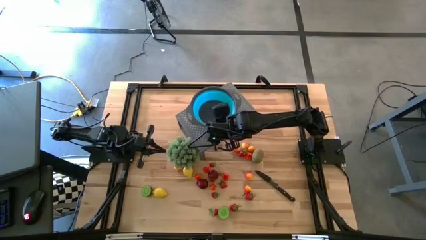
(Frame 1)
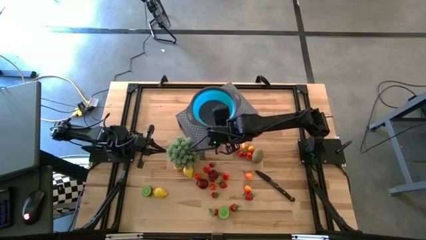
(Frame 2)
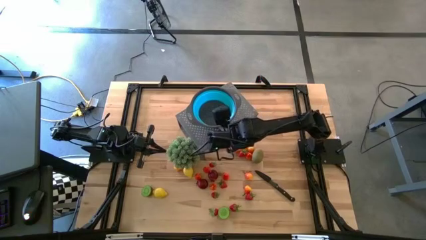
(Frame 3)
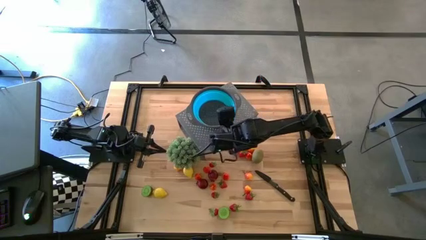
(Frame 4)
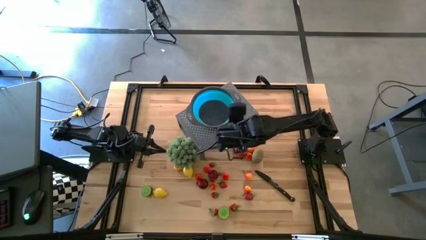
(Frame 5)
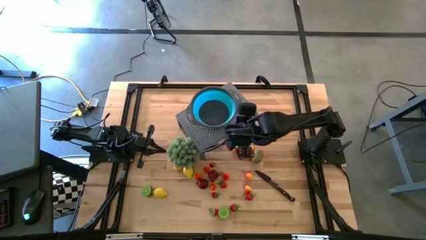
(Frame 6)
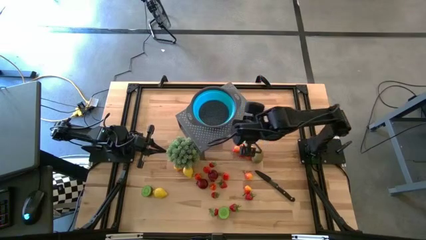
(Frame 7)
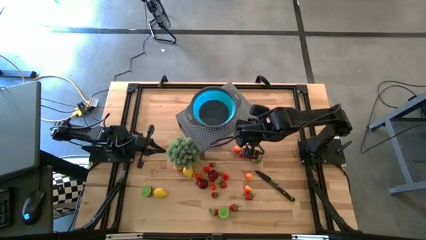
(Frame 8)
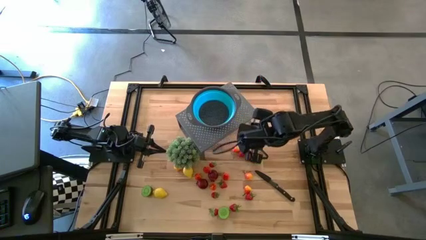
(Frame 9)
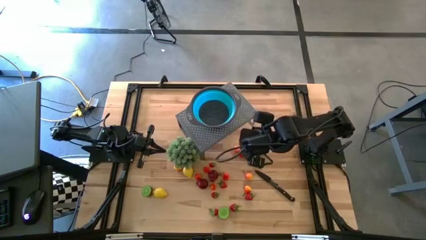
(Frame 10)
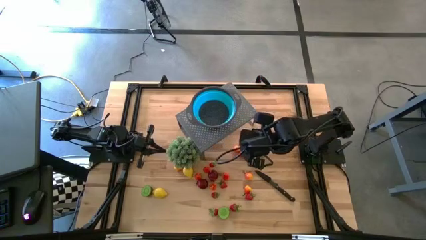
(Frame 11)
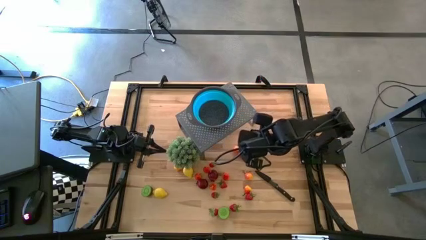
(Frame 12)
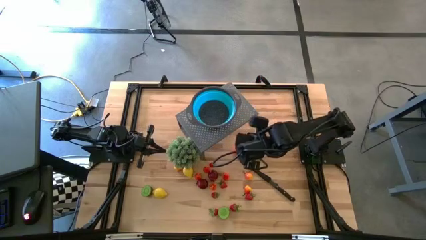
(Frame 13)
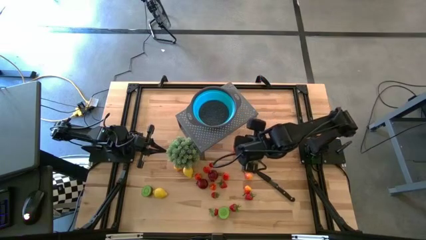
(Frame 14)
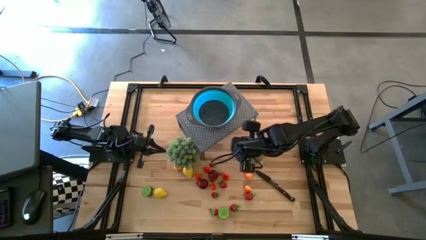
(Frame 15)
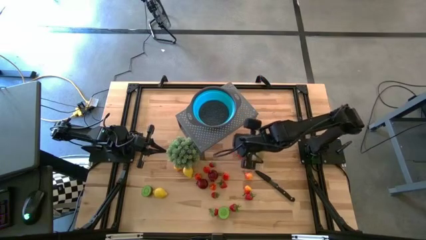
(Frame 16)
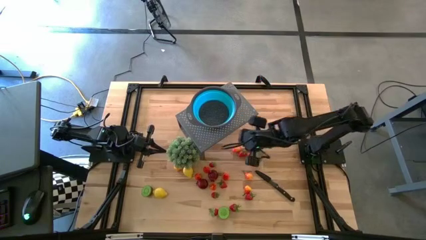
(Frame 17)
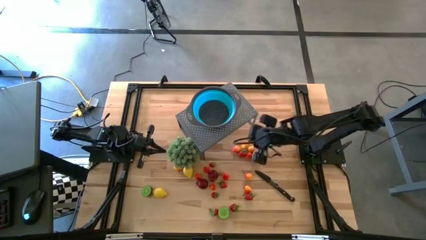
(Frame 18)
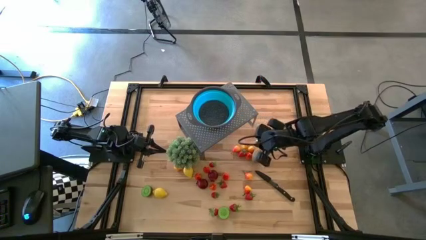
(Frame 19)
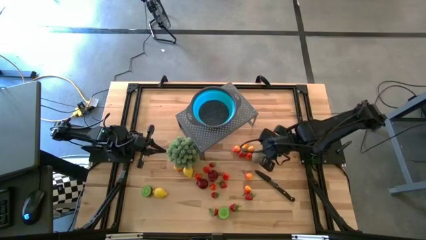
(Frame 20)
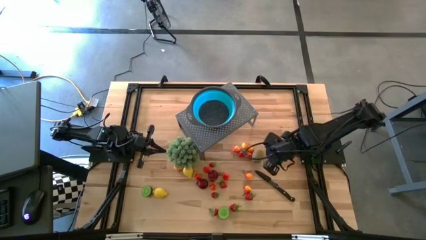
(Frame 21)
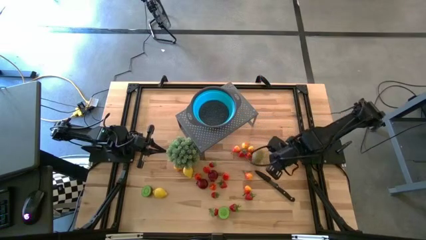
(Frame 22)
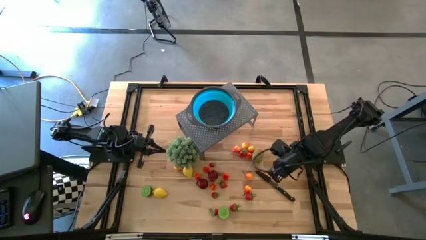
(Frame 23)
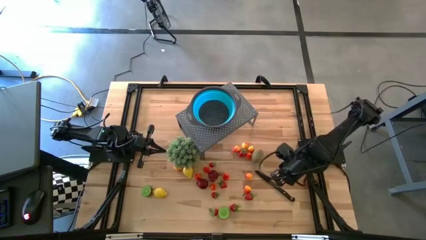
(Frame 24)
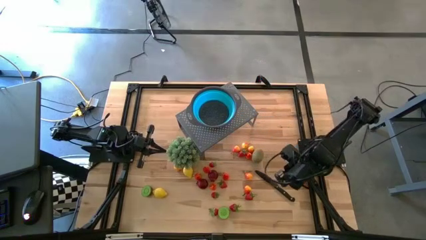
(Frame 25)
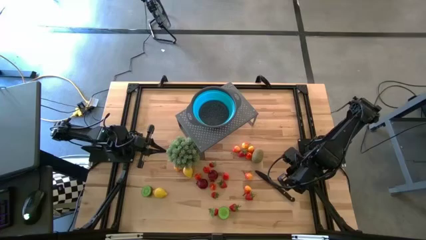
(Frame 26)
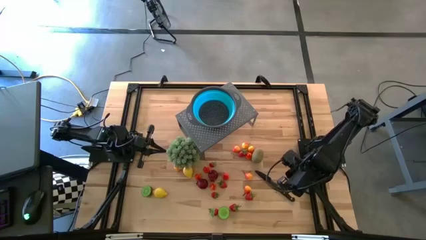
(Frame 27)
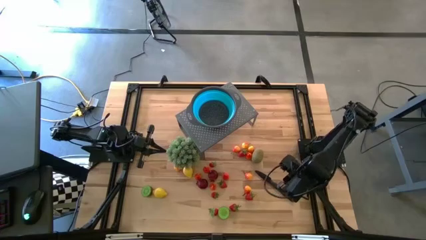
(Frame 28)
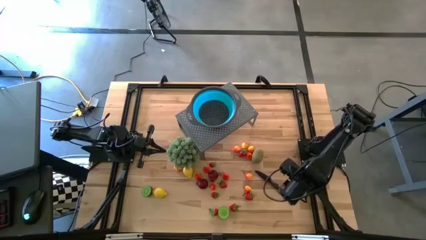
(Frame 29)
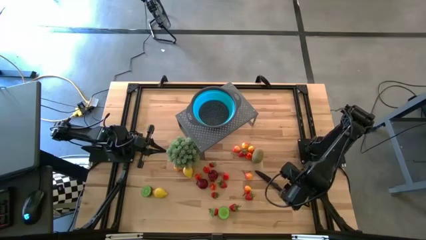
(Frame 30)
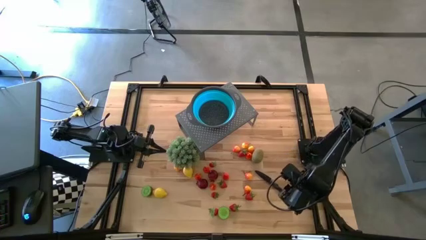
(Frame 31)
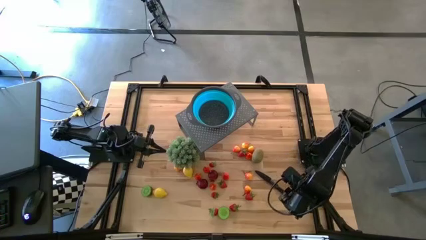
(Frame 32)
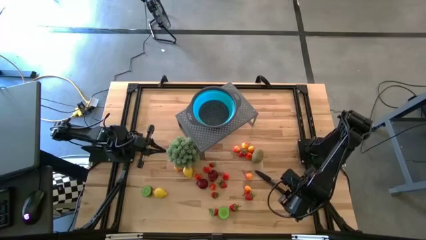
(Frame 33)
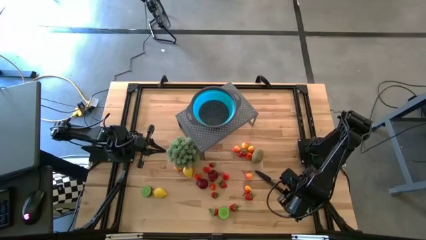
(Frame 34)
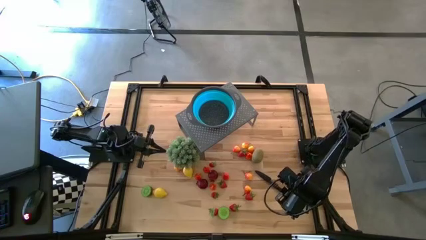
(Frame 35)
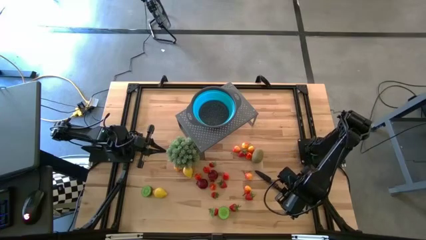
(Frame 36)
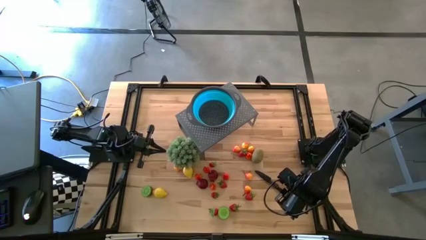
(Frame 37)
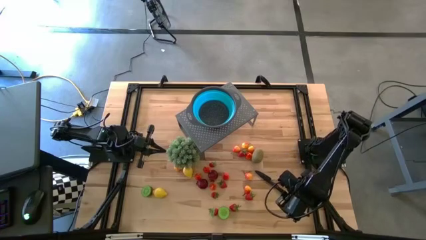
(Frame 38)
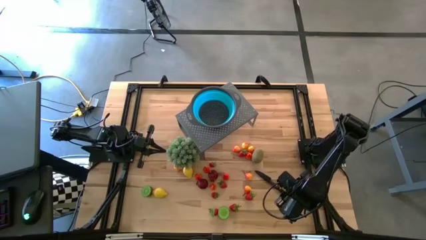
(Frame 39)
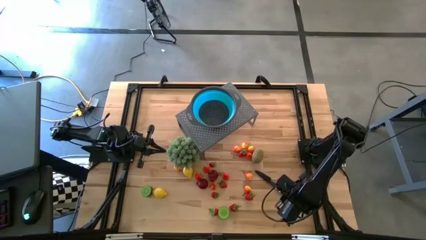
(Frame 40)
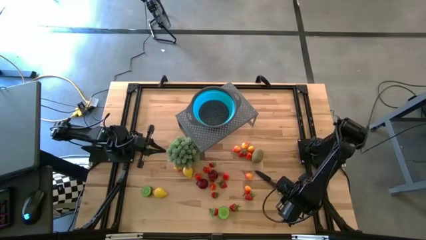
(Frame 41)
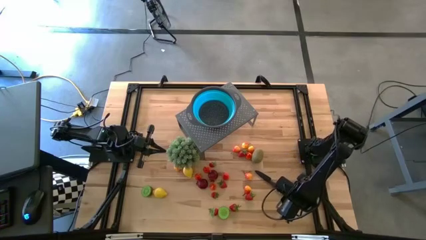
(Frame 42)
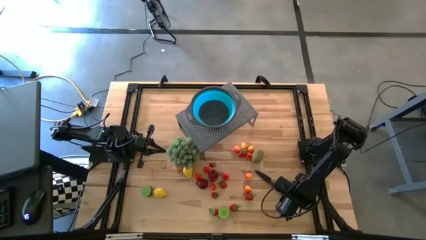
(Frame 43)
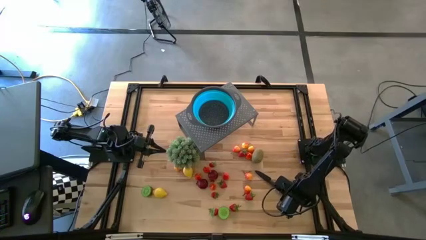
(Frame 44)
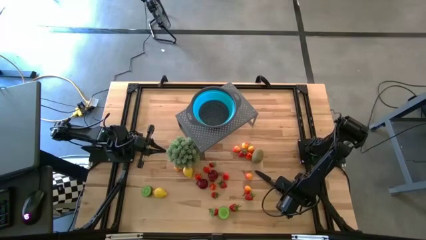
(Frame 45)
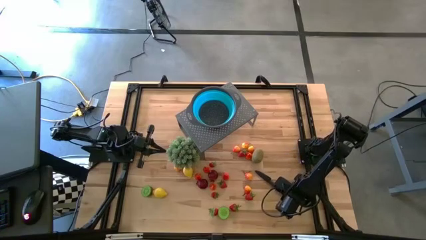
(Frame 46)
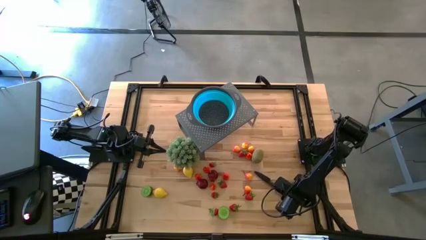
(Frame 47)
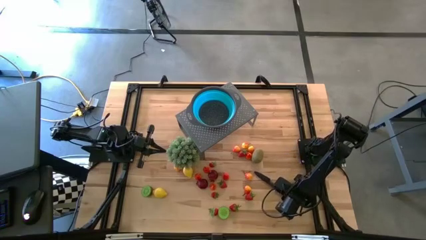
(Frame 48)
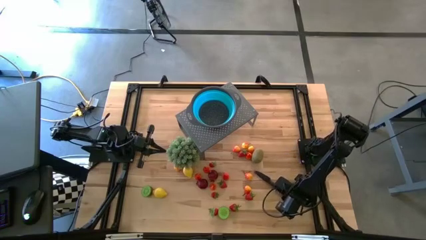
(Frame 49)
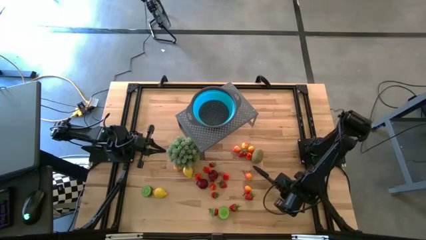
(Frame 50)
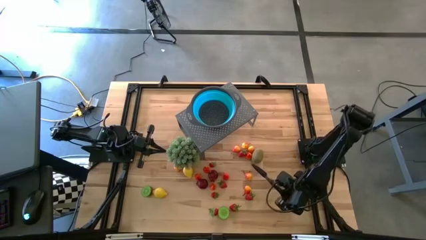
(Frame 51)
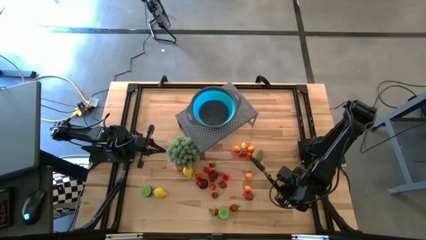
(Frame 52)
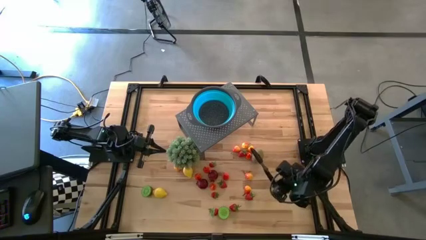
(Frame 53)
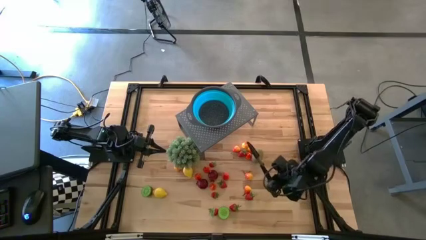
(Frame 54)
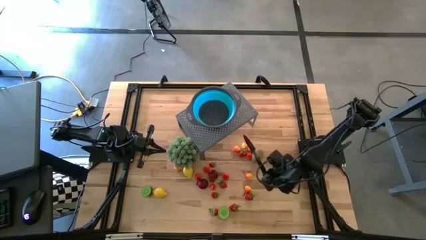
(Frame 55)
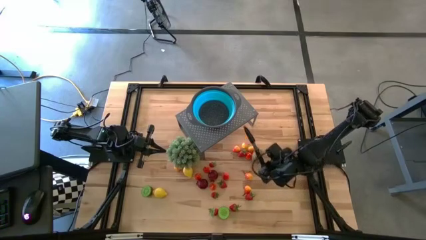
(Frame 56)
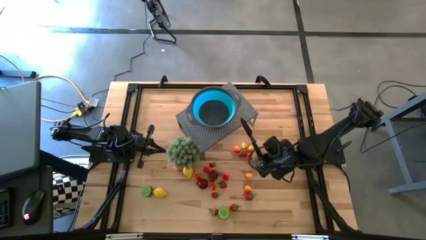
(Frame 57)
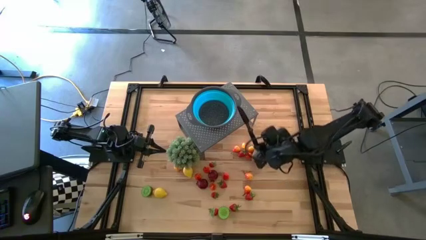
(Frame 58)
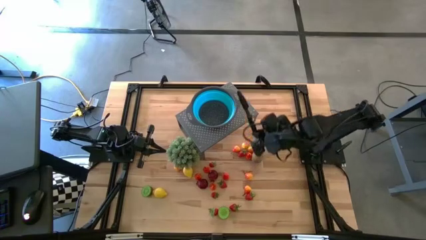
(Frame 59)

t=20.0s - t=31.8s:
Task: Pick & Place Fruit
Put the black kitchen knife on the shelf to the right of the blue strainer bowl
